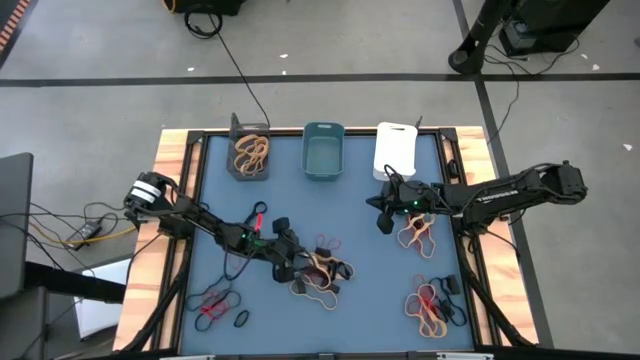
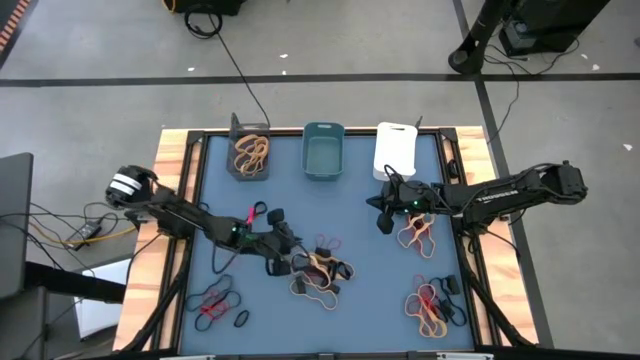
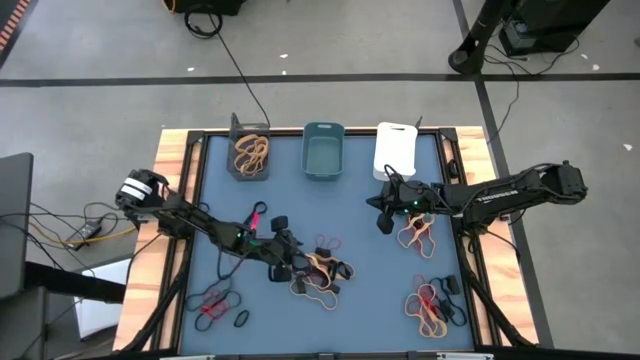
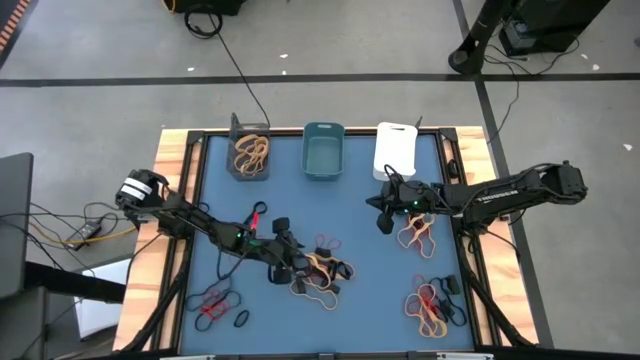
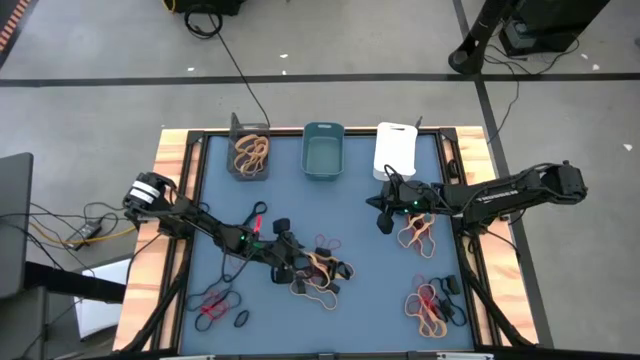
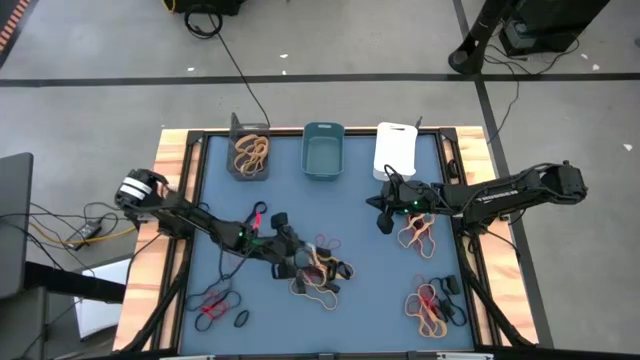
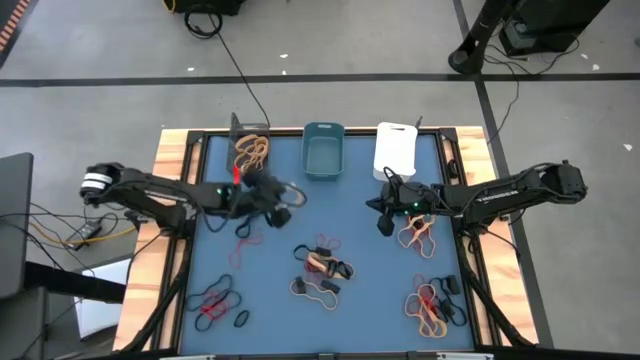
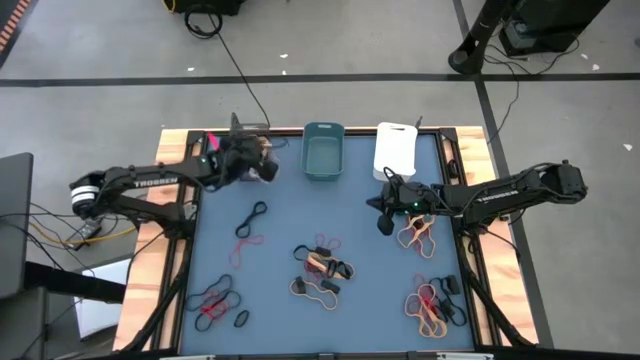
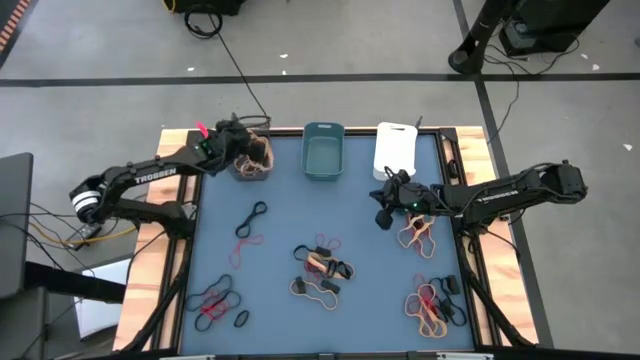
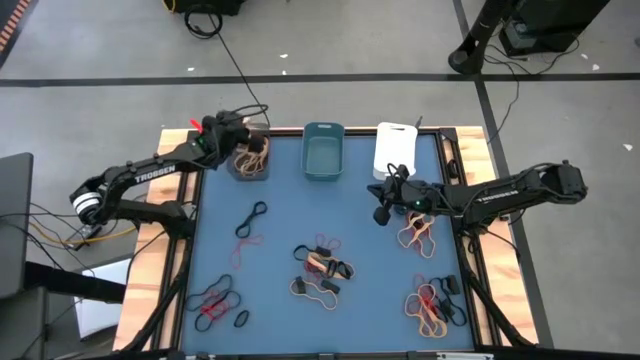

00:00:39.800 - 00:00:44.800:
Task: Sort rubber bands into baskets
Put the yellow rubber band into the black bin

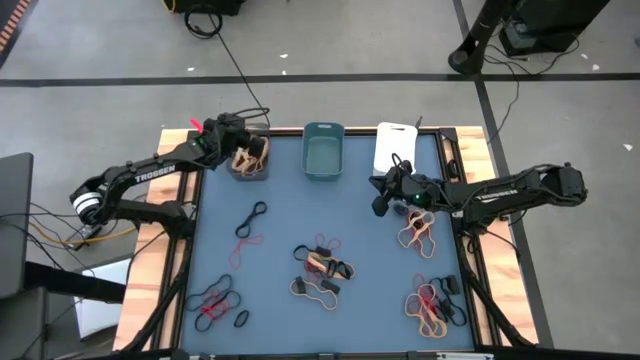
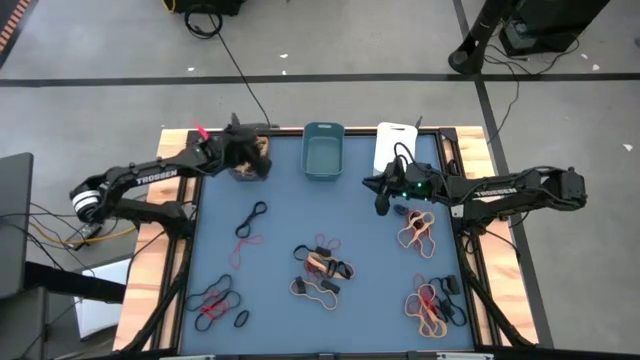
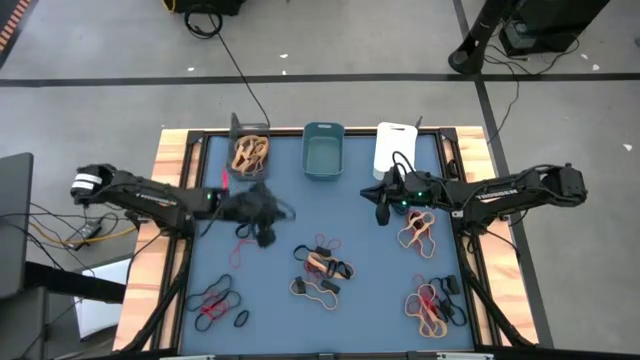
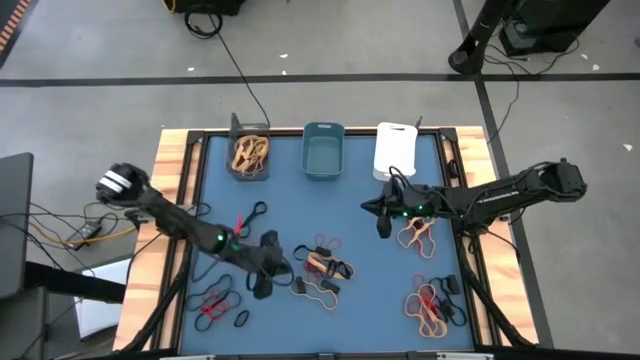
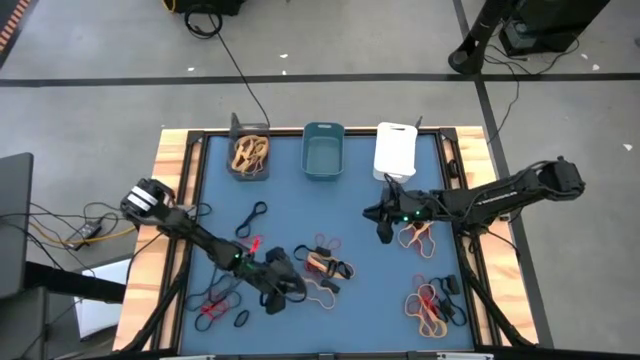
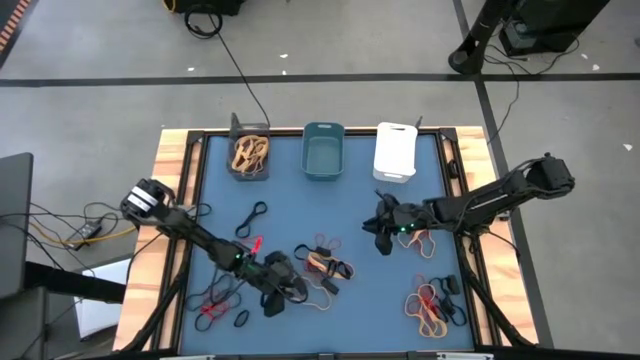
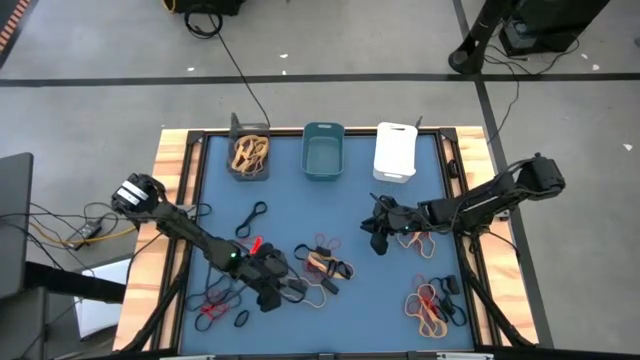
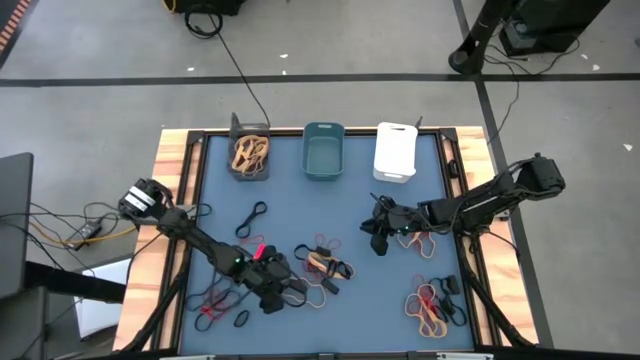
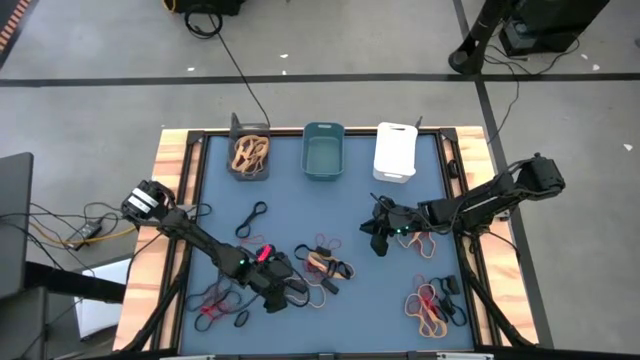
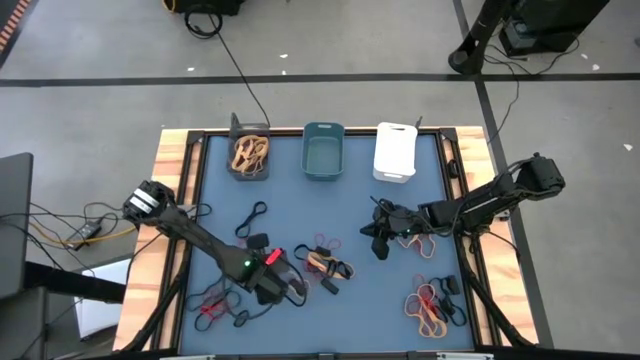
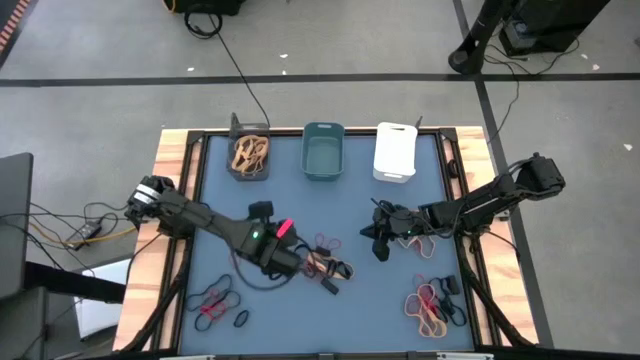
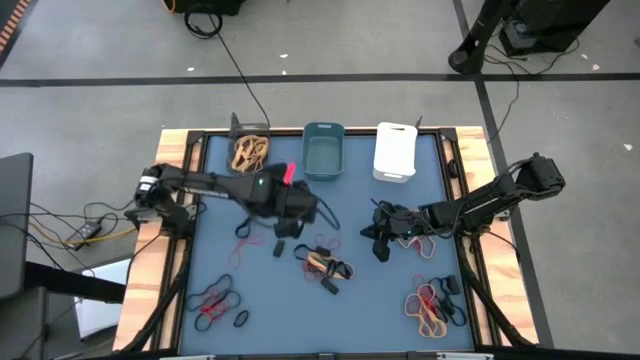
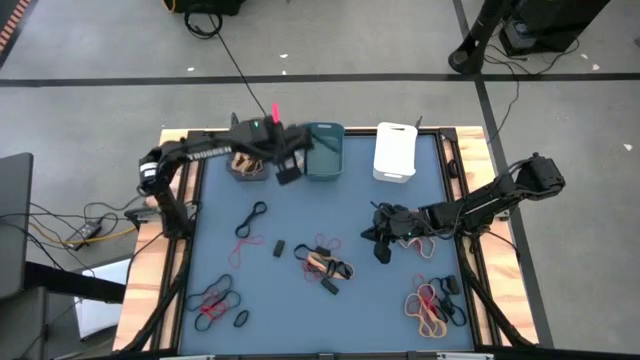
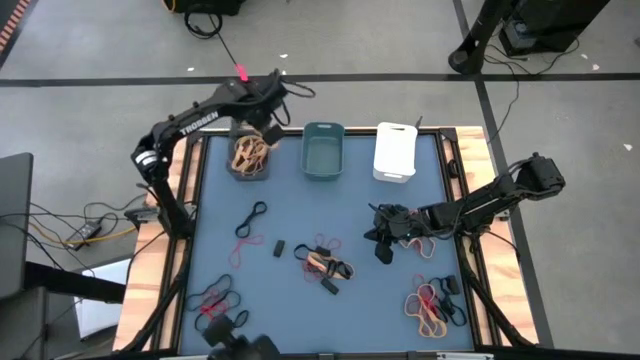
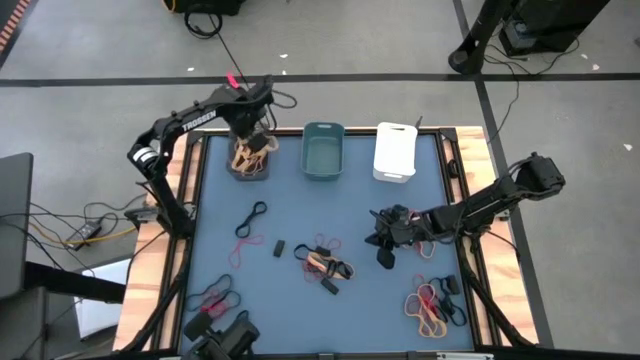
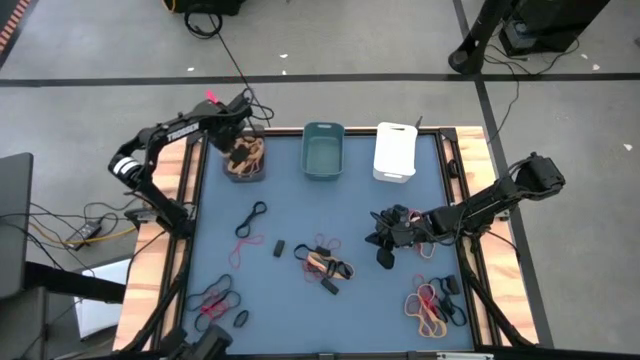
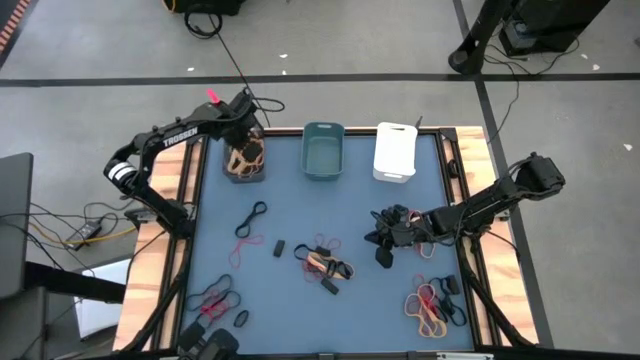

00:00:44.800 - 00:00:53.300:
Put the yellow rubber band into the black bin

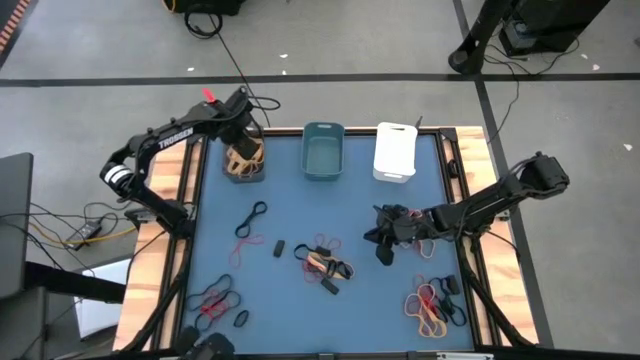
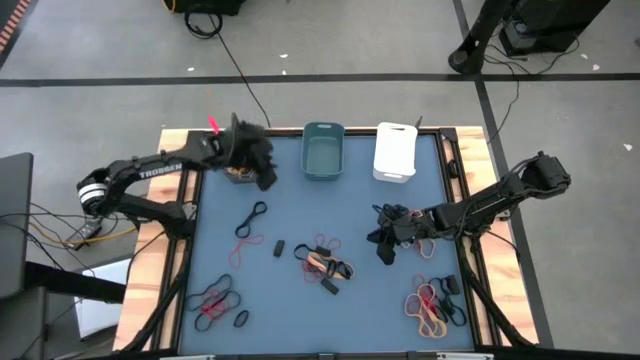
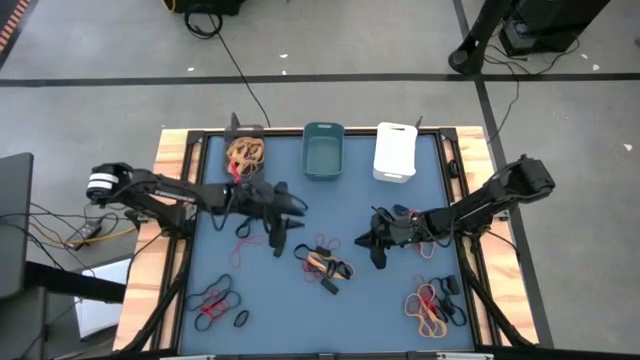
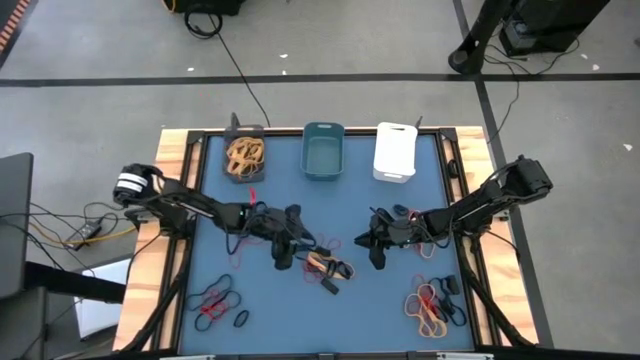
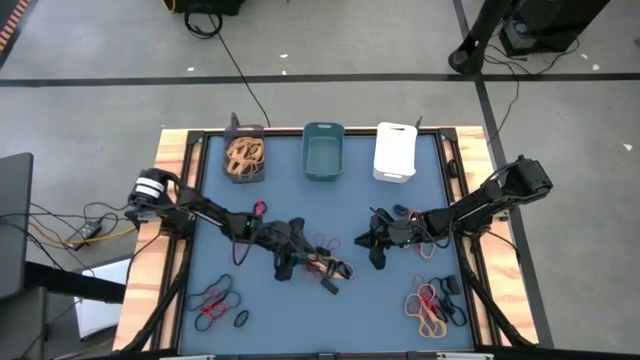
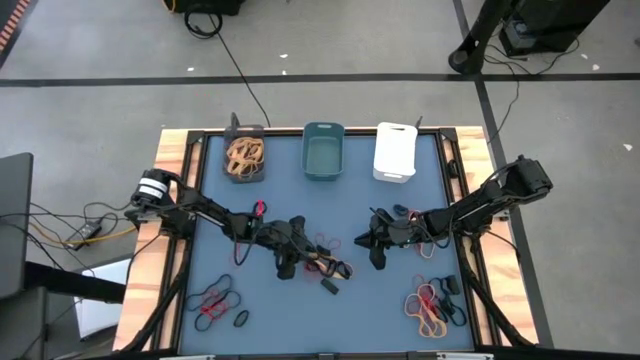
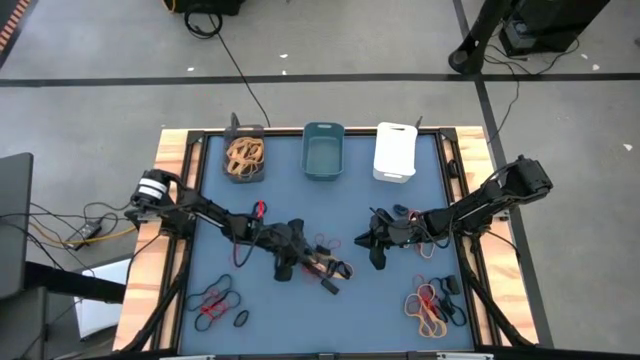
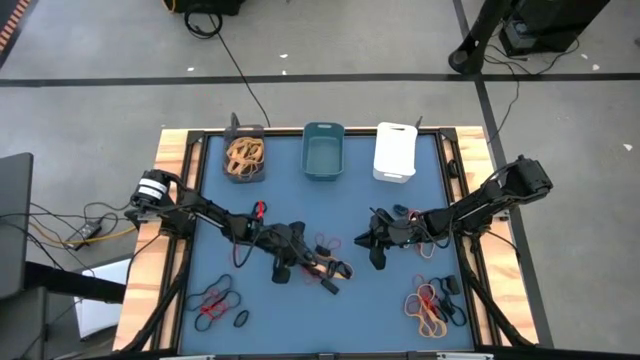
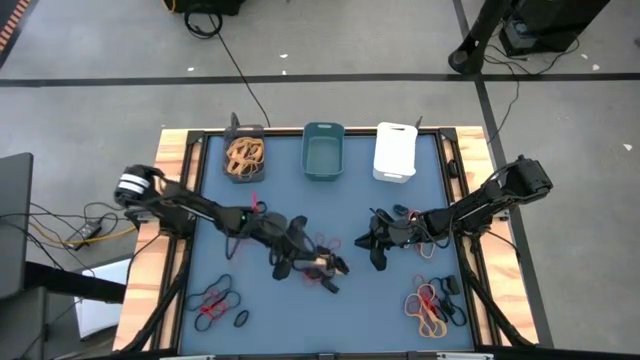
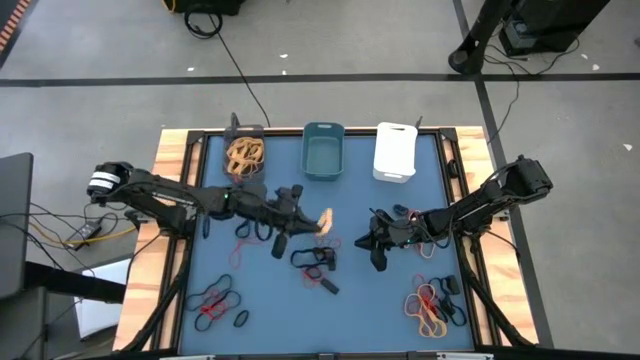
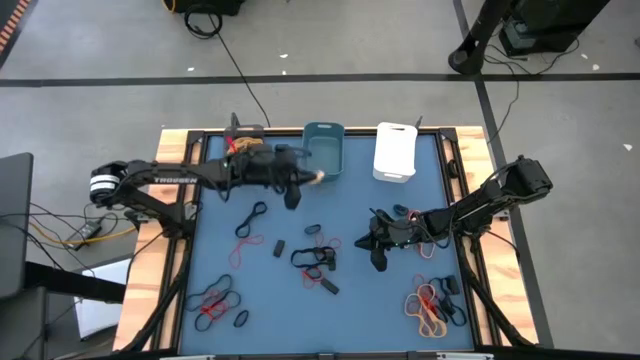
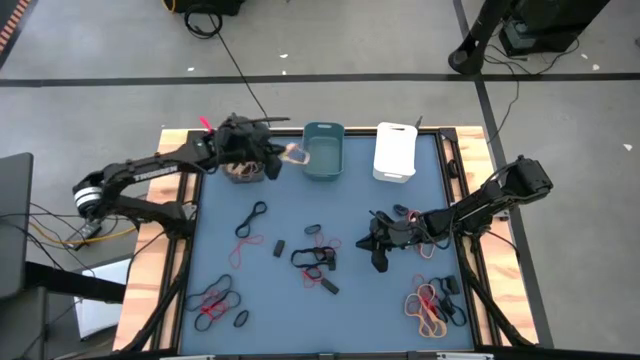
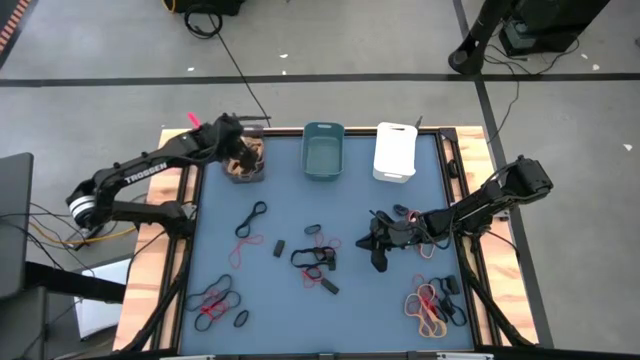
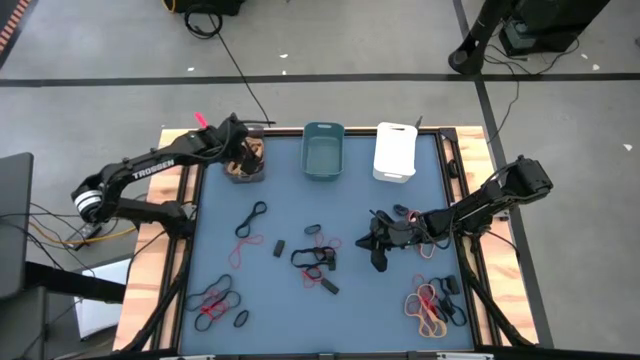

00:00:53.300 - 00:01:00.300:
Put the yellow rubber band into the black bin
